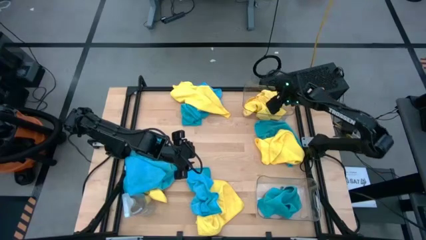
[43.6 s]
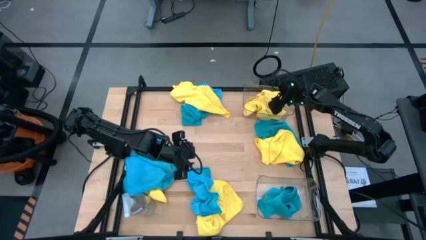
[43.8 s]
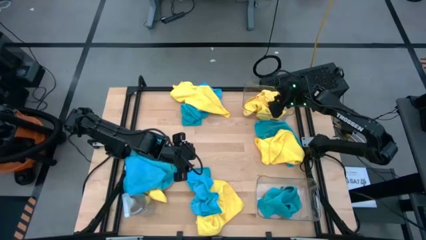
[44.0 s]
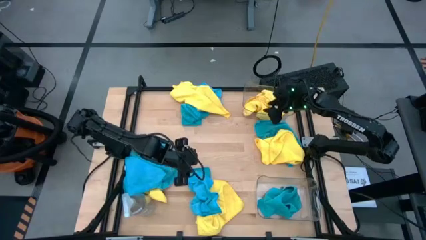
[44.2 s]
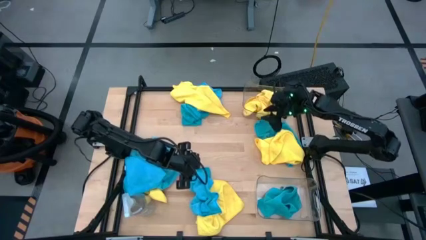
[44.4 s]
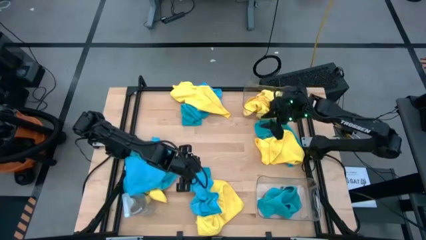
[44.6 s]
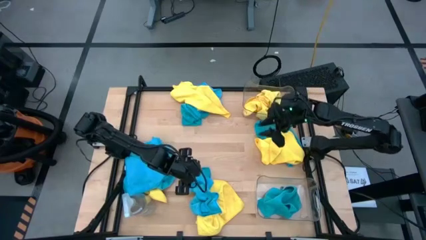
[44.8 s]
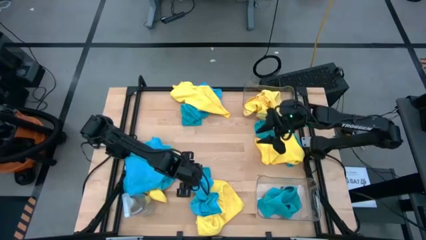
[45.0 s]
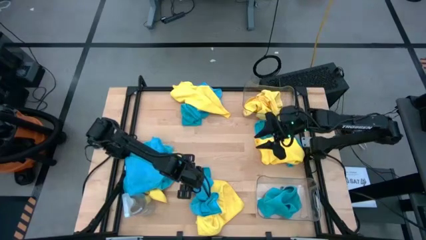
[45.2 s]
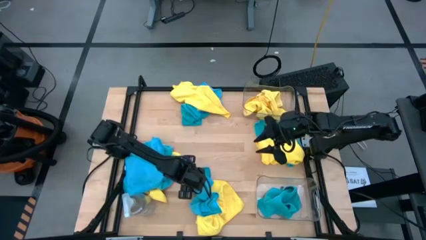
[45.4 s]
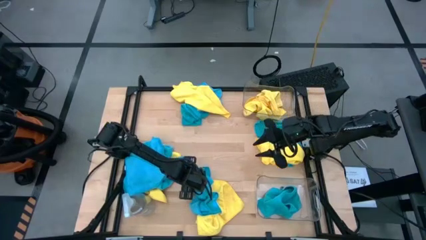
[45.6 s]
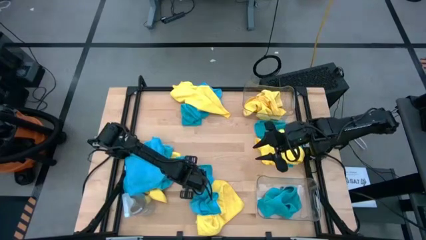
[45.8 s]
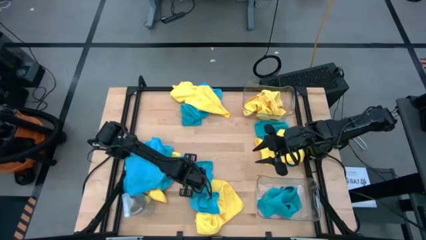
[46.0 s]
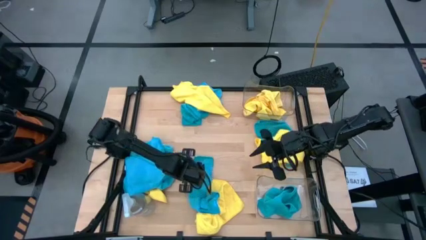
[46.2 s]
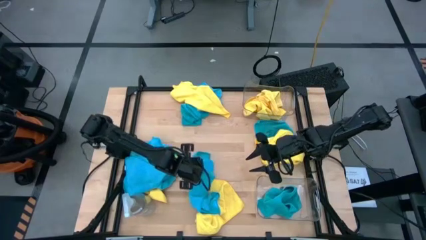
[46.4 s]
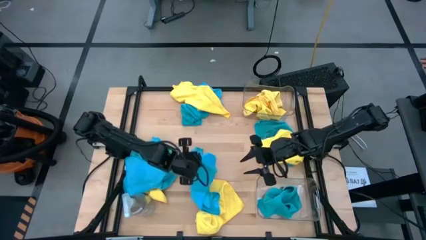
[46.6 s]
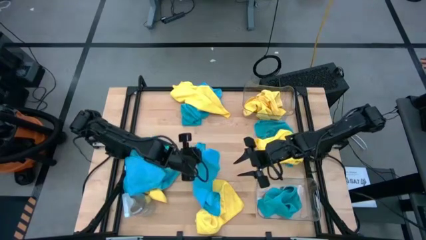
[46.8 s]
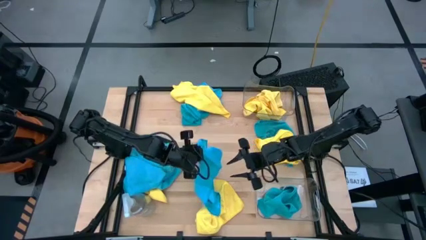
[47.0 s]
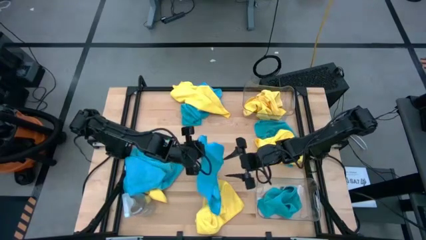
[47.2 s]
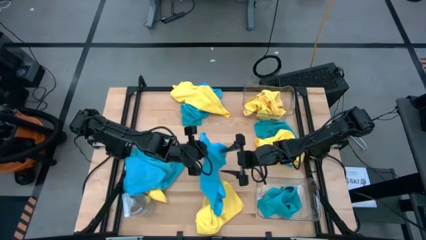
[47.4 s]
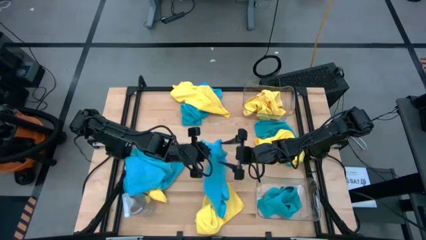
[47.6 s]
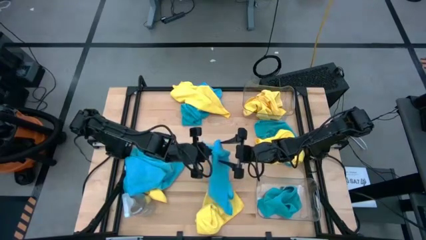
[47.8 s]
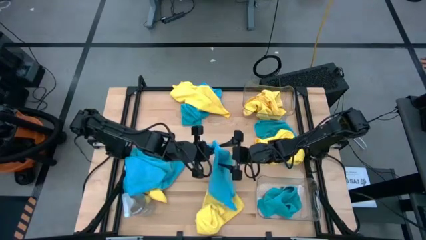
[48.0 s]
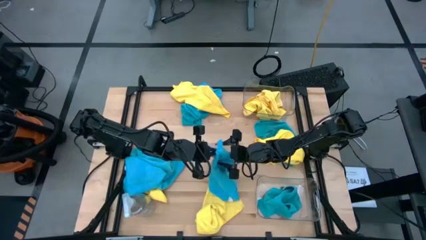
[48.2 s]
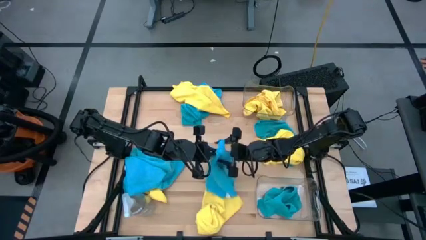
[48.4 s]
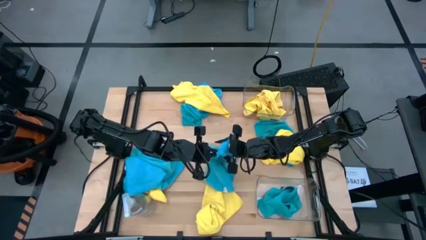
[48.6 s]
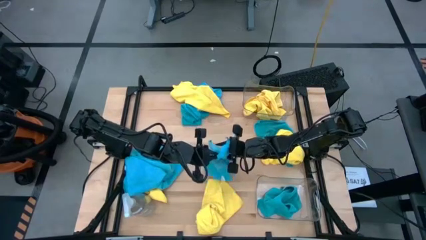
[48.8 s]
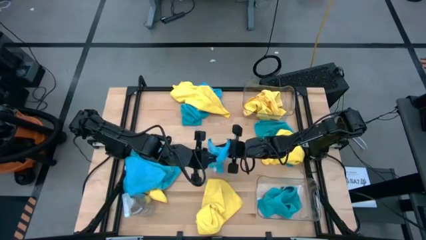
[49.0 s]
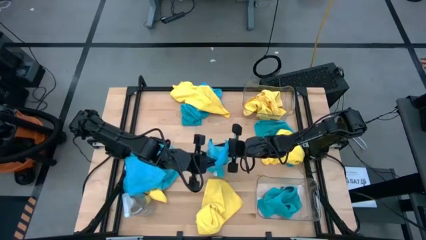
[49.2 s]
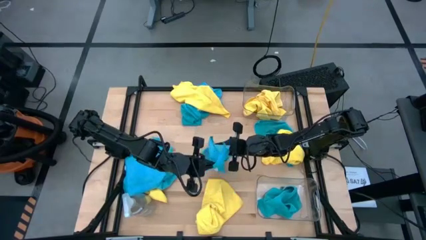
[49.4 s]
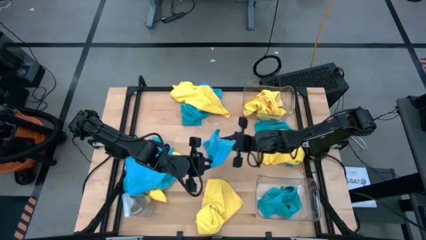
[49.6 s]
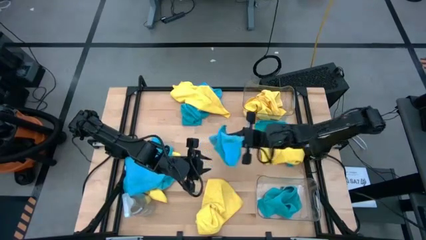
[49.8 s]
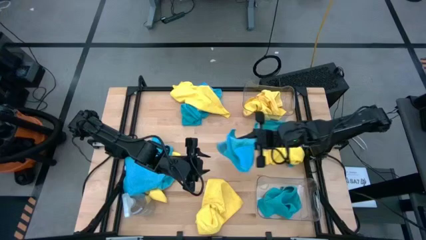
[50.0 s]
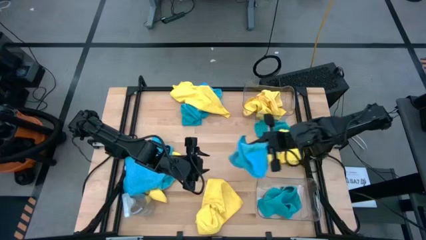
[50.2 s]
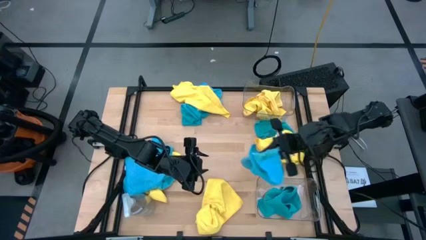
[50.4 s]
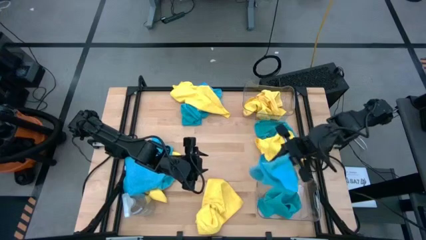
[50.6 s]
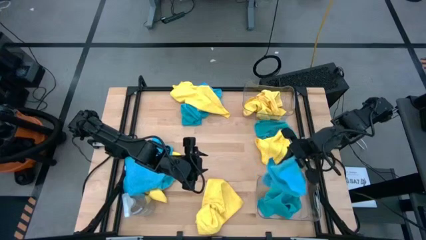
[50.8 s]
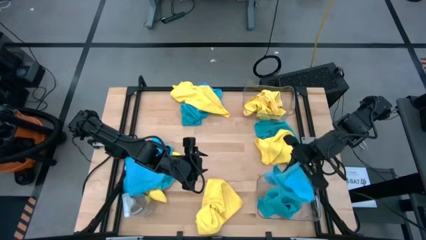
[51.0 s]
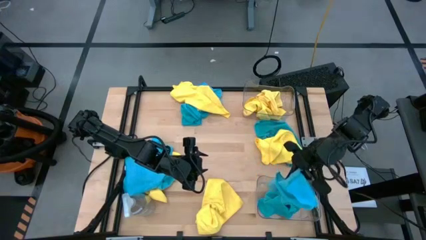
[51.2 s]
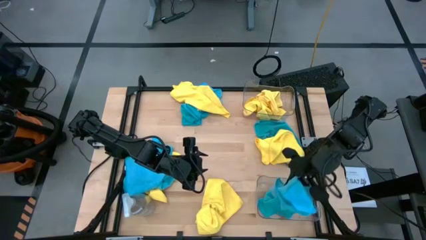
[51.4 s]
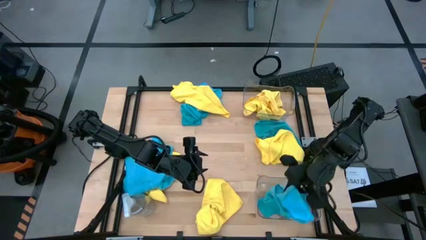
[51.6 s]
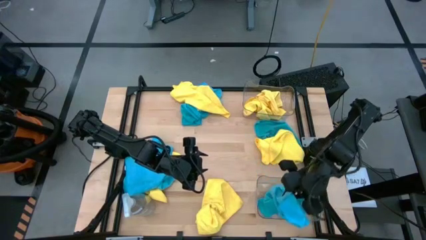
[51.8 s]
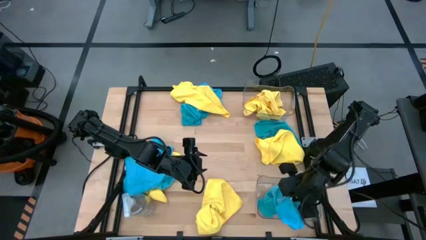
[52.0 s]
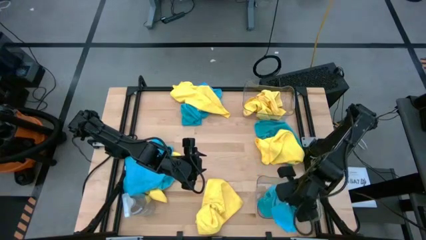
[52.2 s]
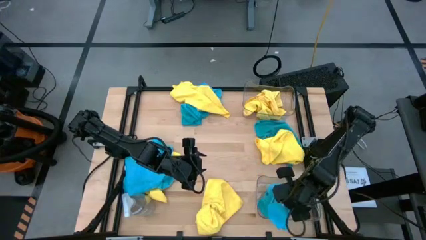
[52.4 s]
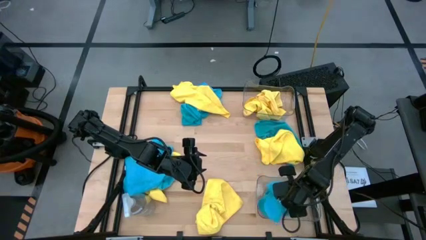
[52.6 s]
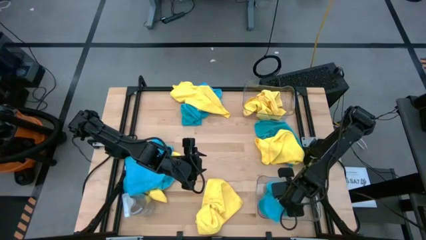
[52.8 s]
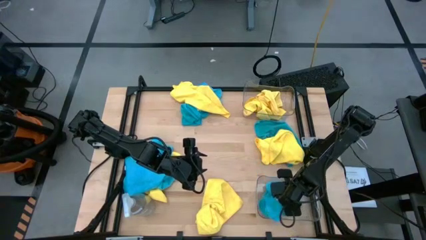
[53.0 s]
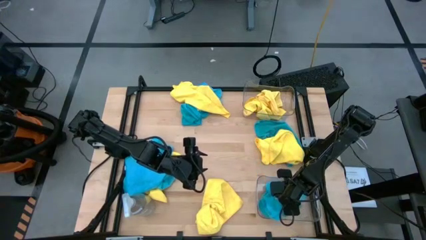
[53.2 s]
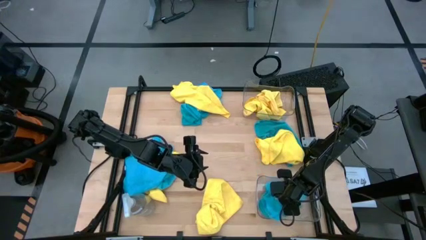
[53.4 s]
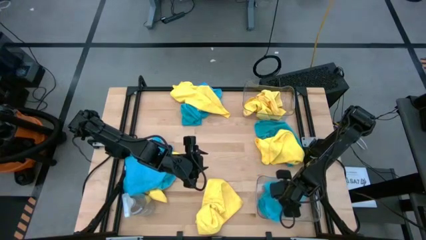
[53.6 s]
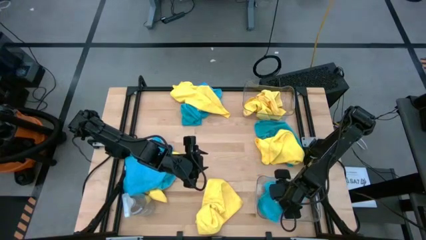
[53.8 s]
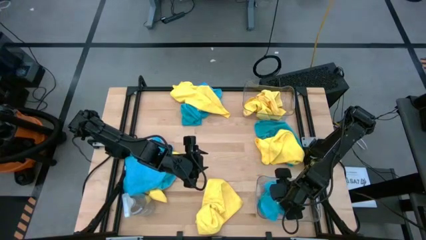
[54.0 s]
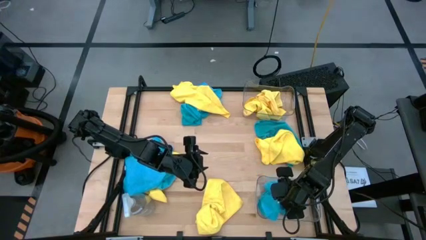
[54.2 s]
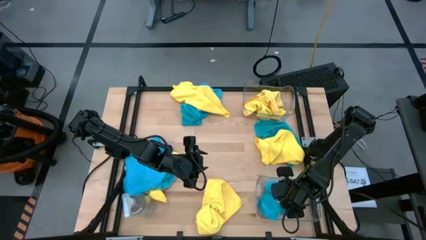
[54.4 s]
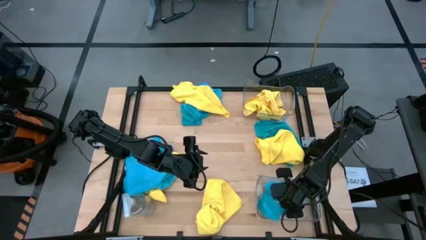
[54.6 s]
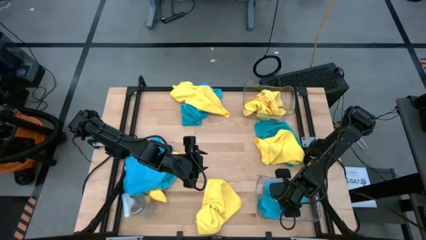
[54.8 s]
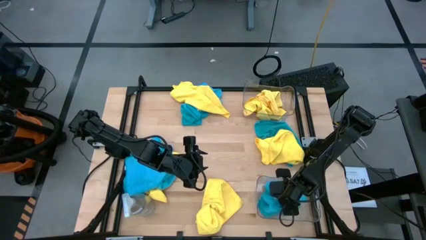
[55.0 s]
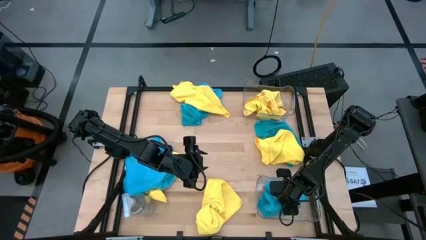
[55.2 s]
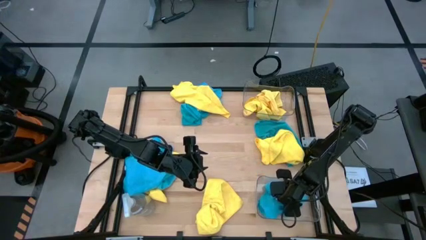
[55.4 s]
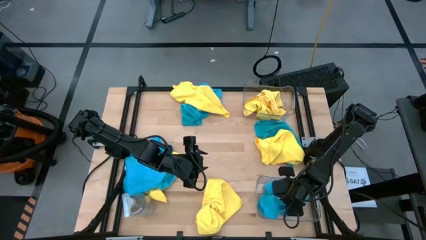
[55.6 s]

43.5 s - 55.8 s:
Task: Sort microfiber towel by color & place in baskets
Put the blue microfiber cloth into the bottom transparent bin
